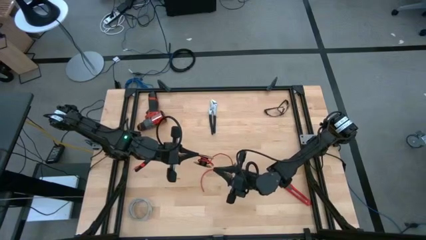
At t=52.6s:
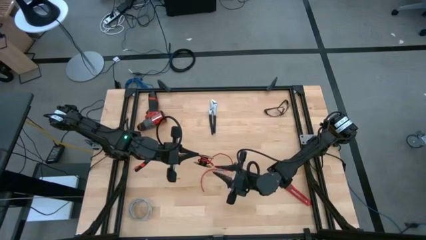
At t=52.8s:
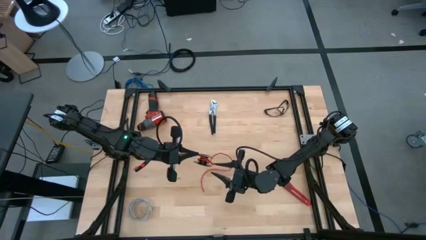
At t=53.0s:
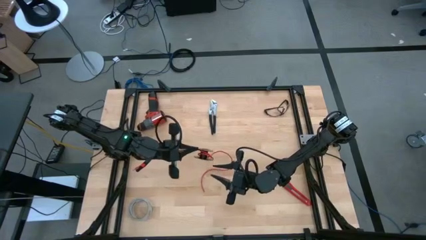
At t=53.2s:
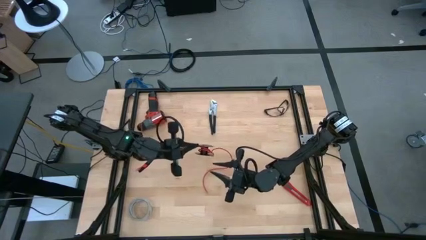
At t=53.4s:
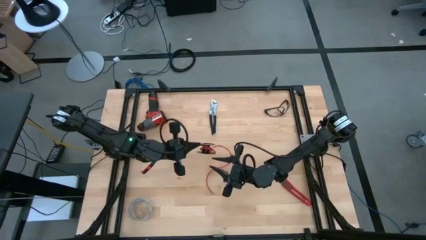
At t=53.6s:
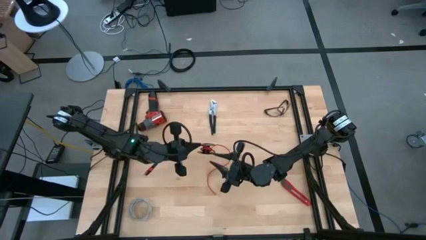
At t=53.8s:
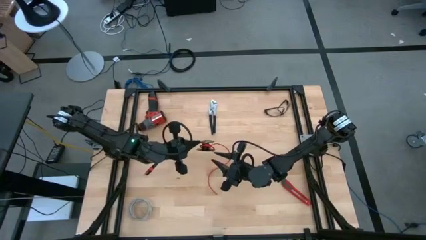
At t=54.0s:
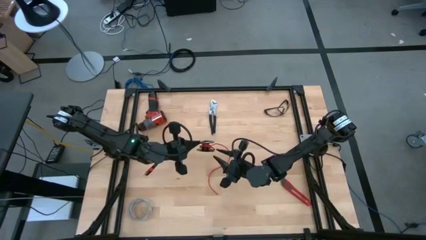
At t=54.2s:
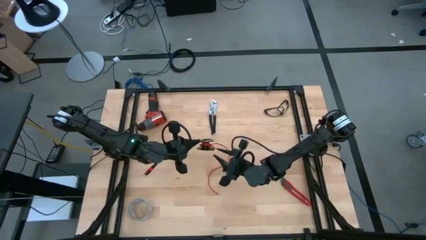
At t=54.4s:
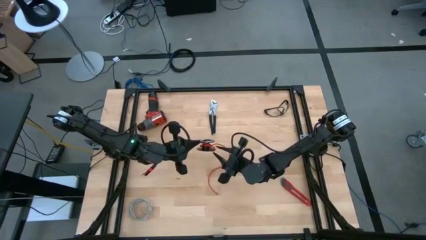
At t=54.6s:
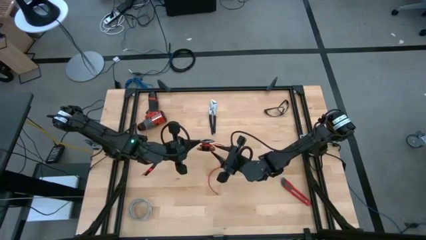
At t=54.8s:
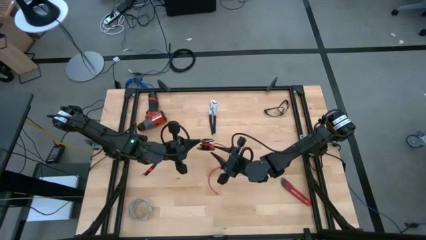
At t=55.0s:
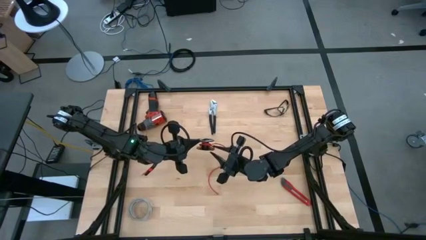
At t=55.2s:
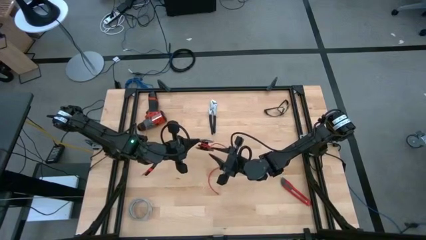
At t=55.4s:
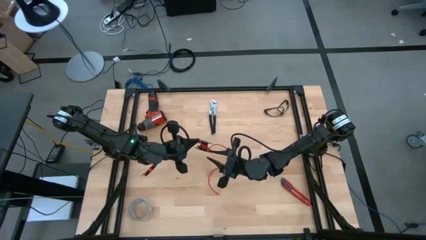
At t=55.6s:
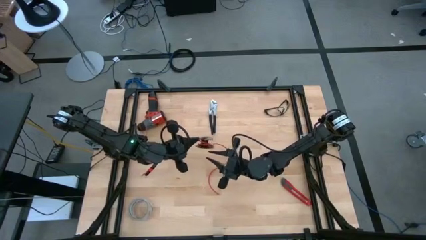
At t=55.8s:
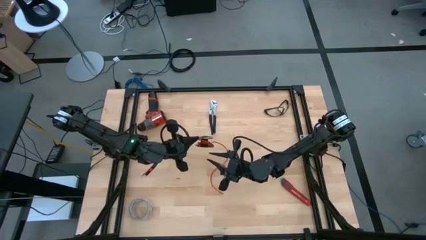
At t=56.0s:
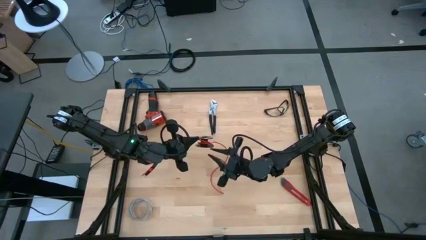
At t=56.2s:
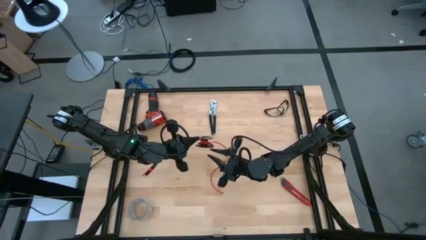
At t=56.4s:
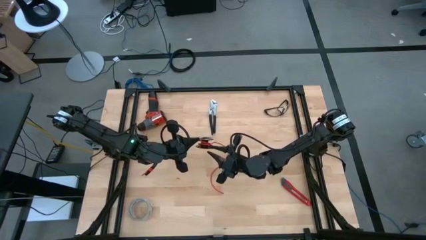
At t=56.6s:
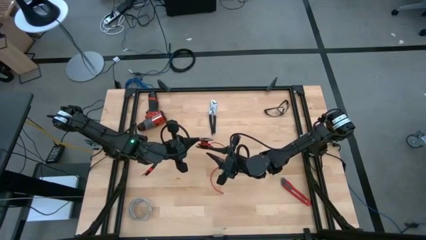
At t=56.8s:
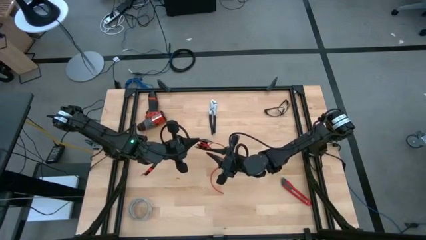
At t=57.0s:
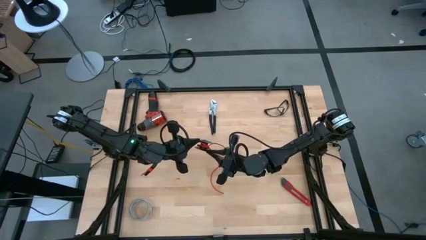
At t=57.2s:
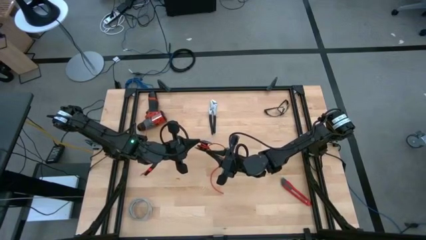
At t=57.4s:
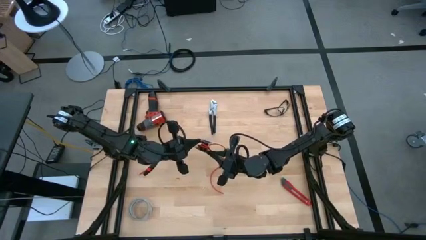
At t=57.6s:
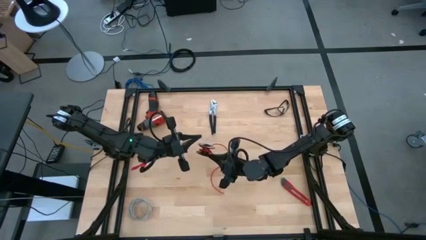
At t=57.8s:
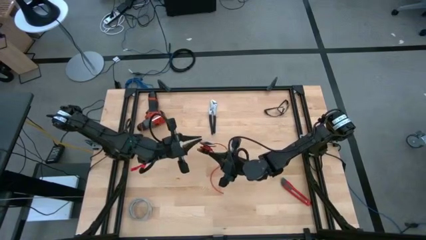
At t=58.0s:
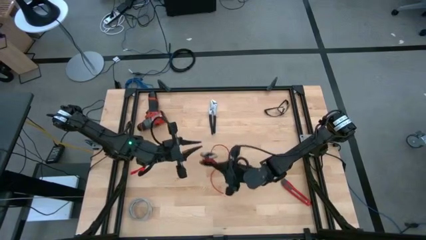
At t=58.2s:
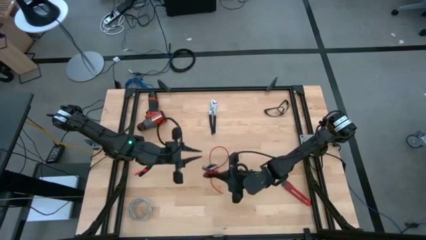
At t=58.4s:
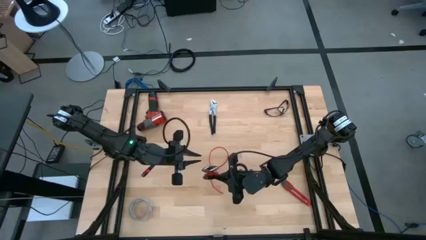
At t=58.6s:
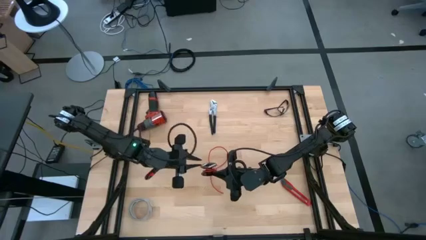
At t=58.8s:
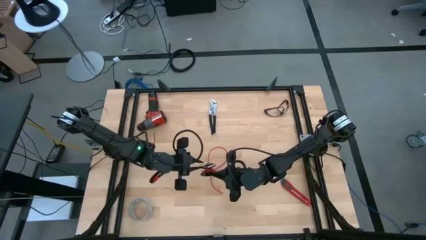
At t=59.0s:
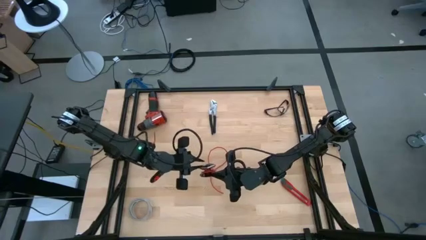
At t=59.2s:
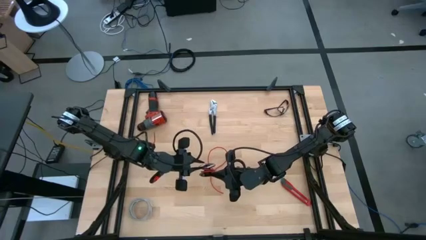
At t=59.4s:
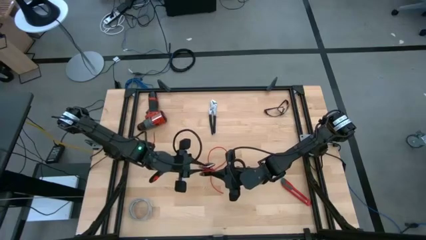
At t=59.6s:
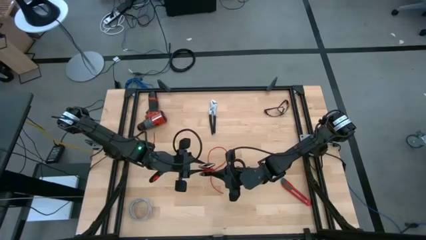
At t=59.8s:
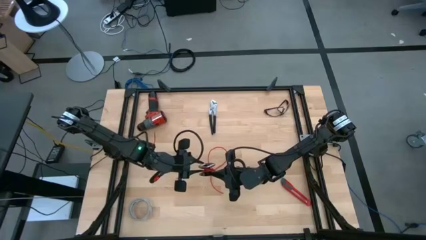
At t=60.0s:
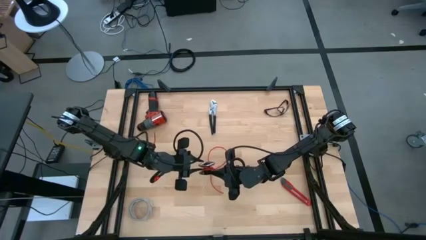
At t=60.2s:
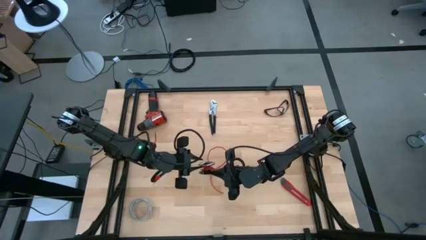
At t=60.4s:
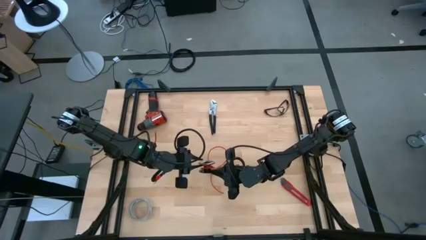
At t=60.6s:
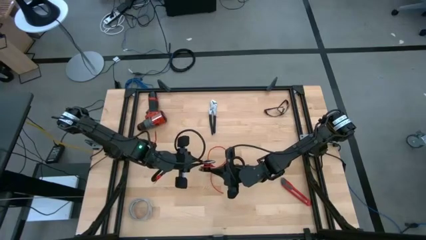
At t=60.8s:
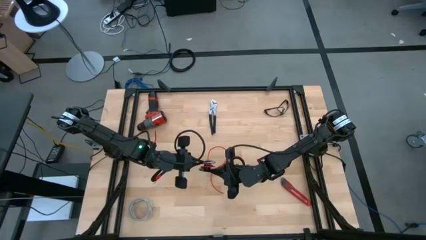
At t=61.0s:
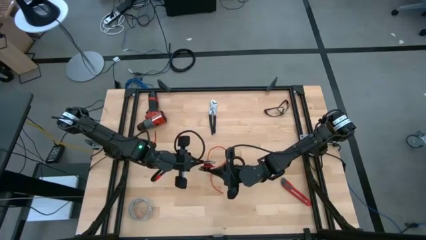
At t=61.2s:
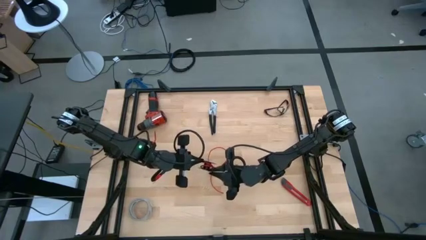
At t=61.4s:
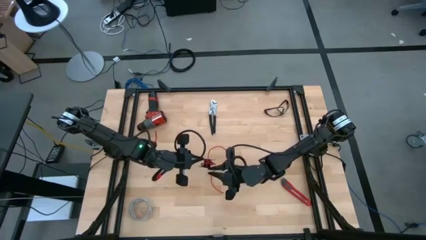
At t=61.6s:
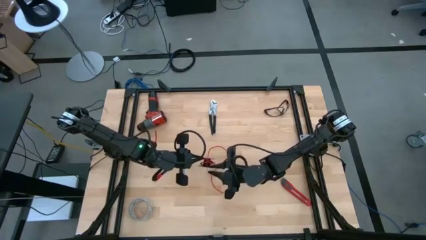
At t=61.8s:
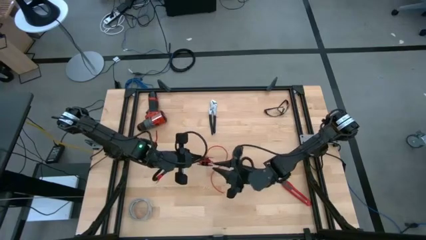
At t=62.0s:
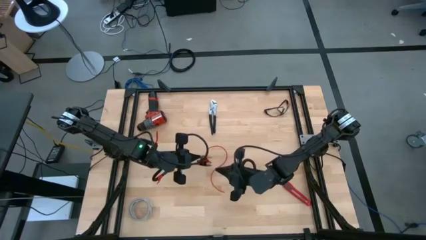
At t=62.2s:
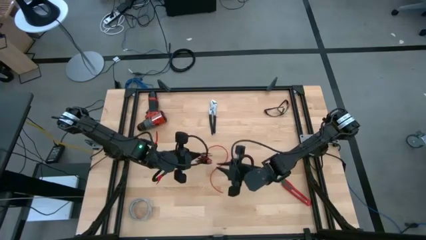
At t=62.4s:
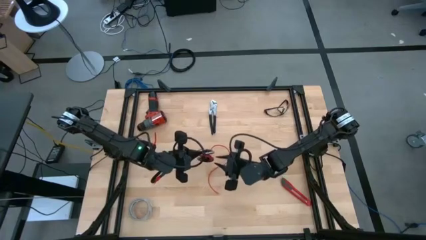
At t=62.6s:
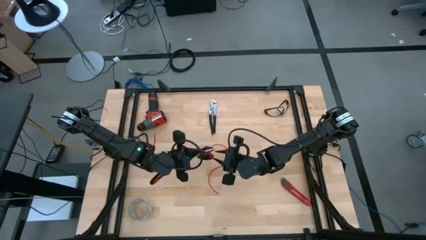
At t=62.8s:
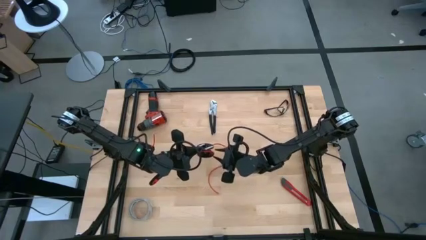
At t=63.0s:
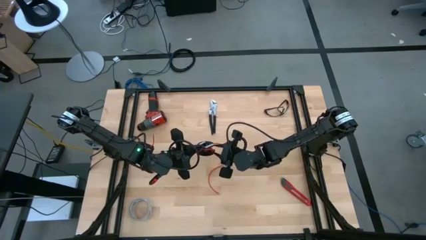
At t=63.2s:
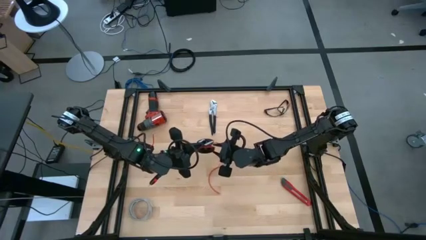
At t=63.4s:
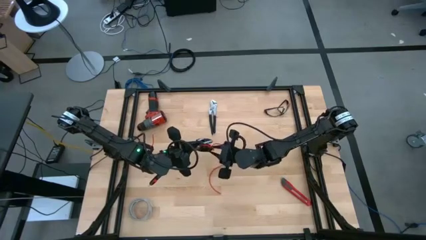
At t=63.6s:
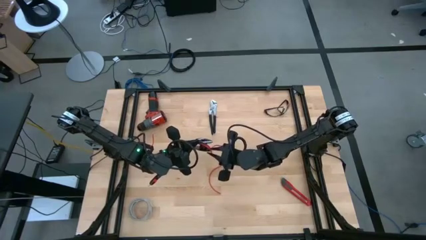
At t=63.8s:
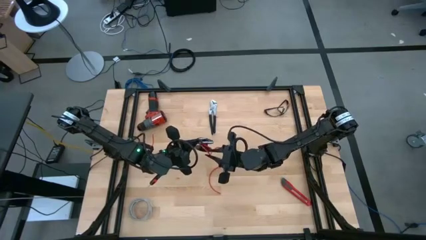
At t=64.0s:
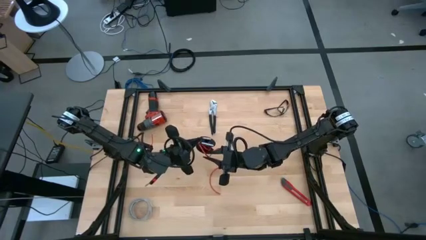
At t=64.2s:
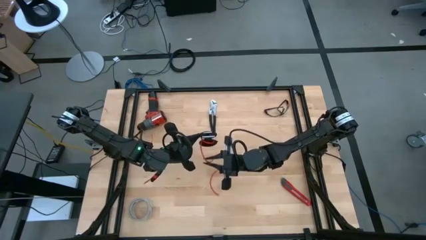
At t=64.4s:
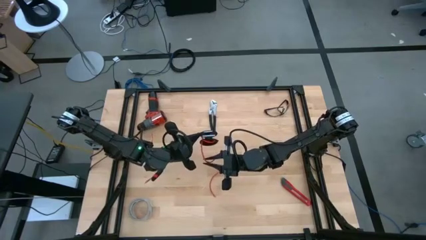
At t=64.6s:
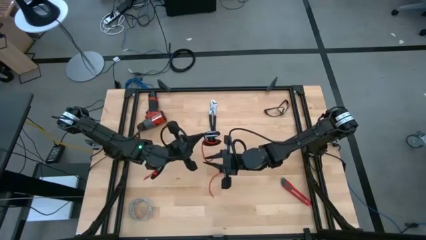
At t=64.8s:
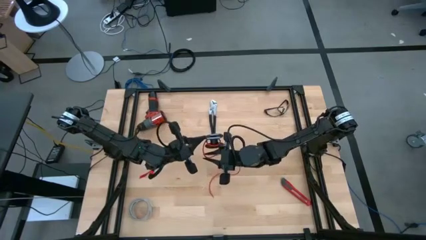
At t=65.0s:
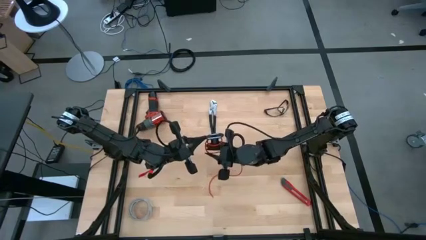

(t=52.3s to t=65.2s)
Task: Coil cords
Uncoil the red wire from the black spool

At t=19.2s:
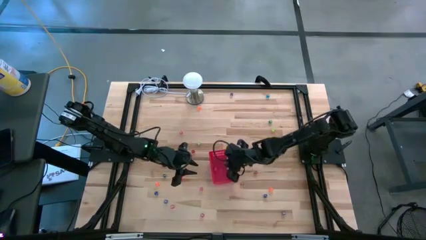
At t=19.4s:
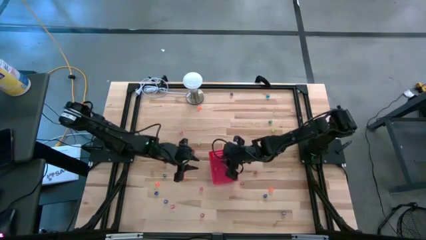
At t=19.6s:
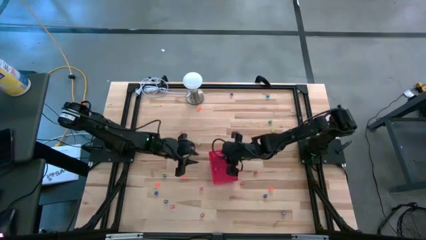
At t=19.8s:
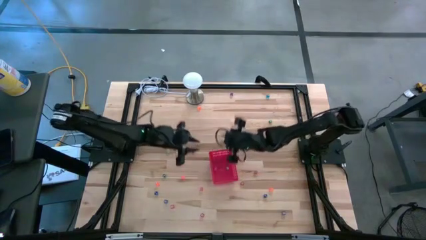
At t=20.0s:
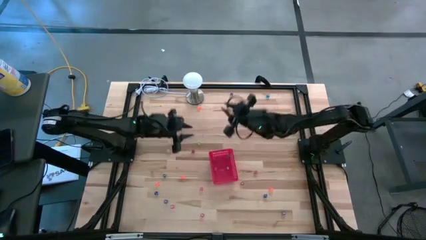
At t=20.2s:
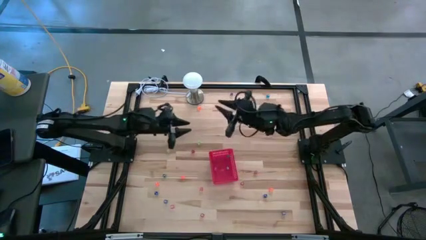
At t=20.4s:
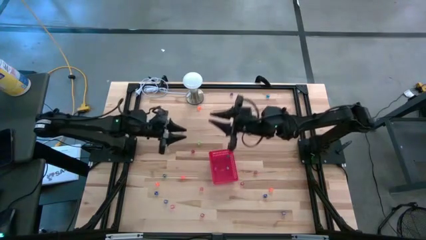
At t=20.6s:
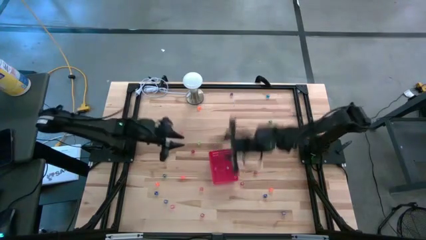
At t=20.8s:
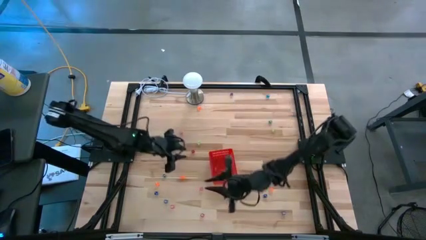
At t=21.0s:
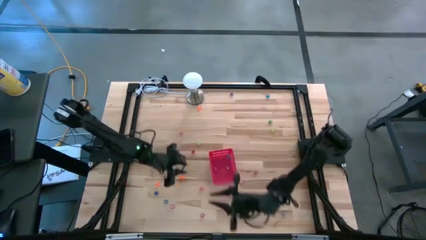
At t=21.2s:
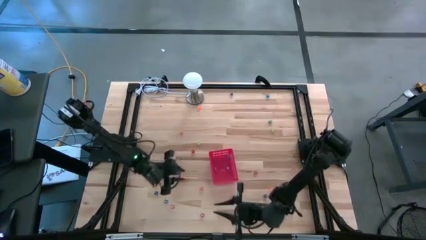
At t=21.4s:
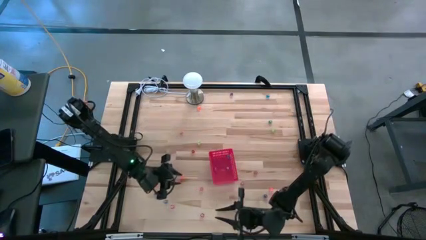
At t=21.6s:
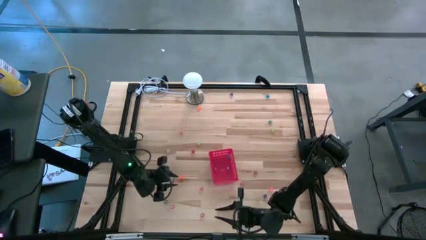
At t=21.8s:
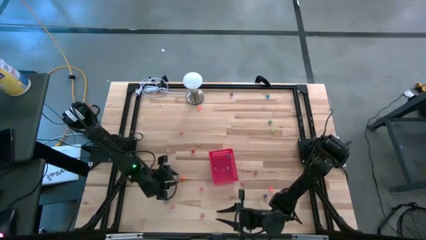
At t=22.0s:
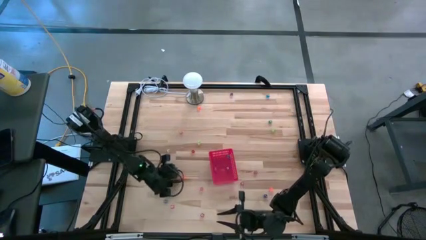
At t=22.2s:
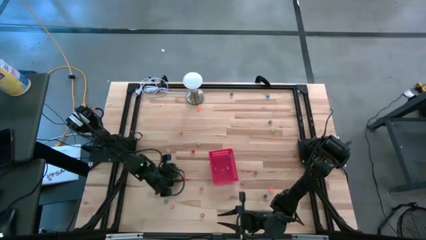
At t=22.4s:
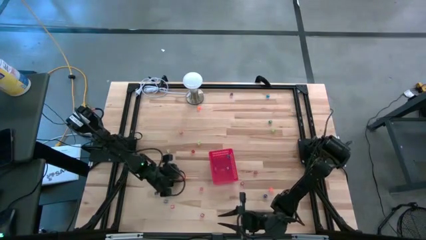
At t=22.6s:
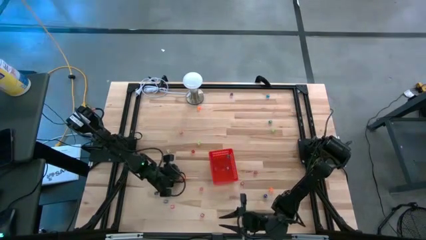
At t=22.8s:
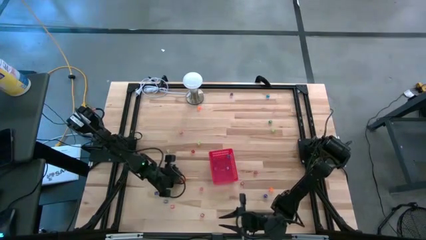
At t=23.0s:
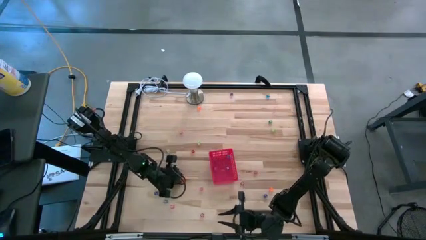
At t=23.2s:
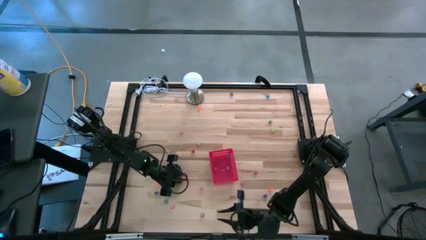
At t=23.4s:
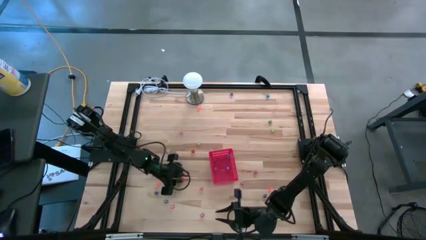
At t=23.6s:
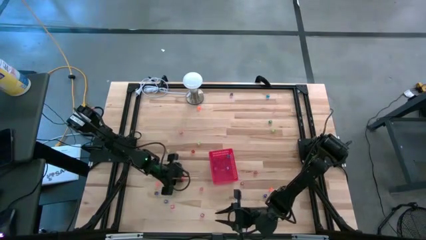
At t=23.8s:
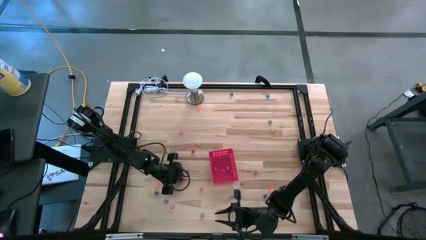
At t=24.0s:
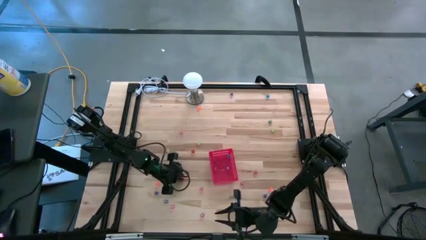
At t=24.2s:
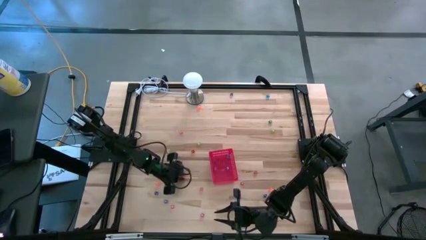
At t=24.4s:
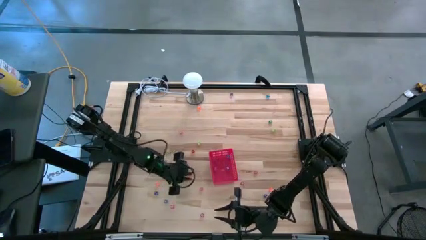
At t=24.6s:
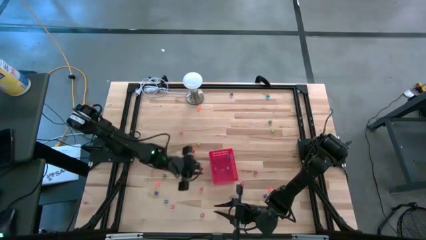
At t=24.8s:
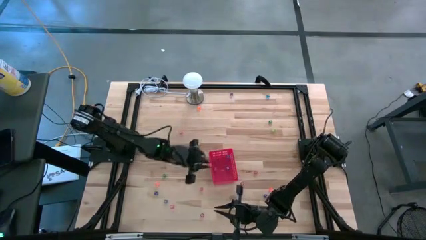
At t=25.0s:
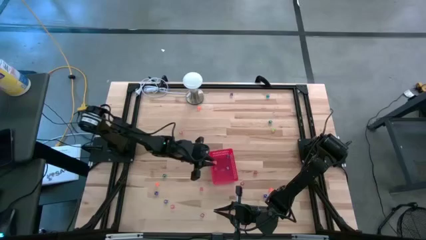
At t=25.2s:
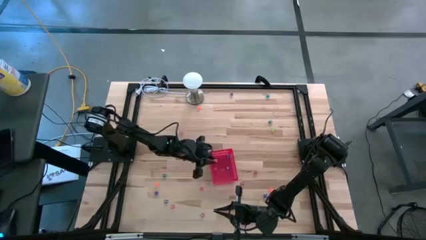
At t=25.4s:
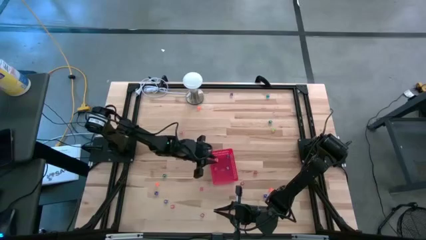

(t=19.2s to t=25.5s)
Task: Pick & Place Dice
Put the orange die into the red basket
